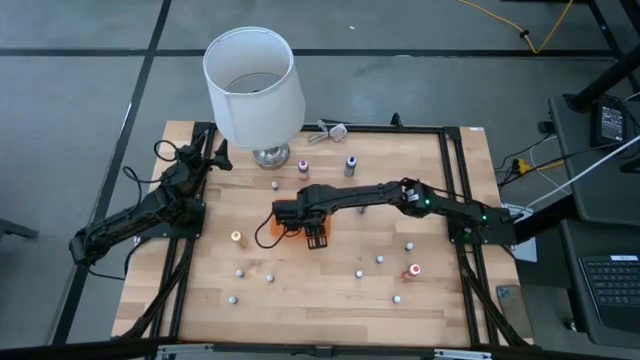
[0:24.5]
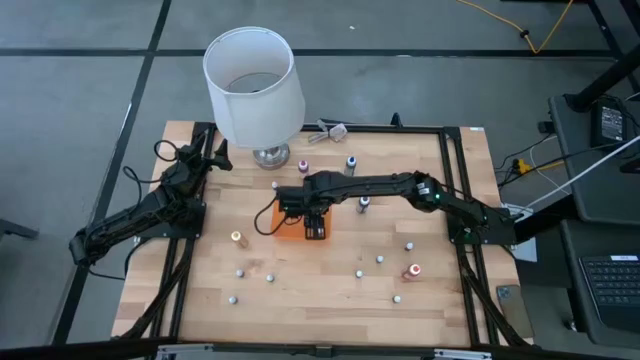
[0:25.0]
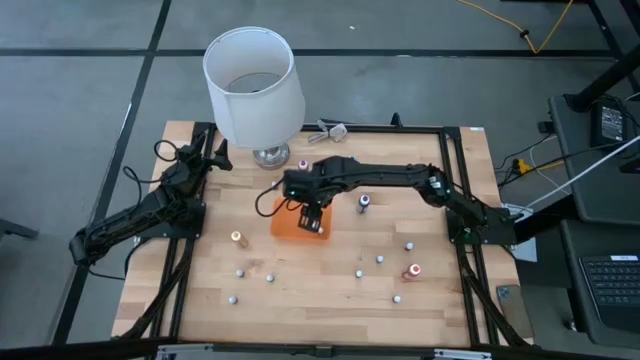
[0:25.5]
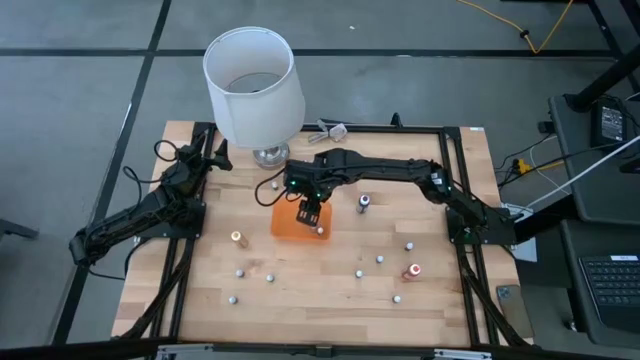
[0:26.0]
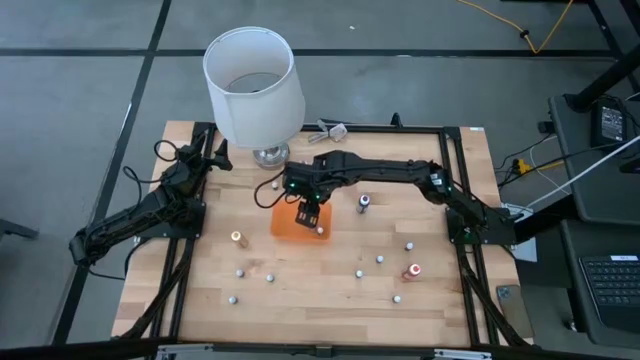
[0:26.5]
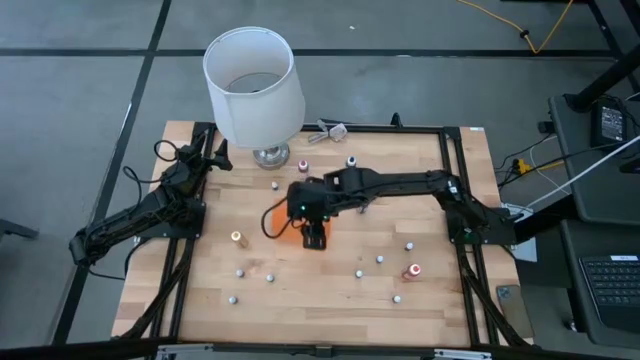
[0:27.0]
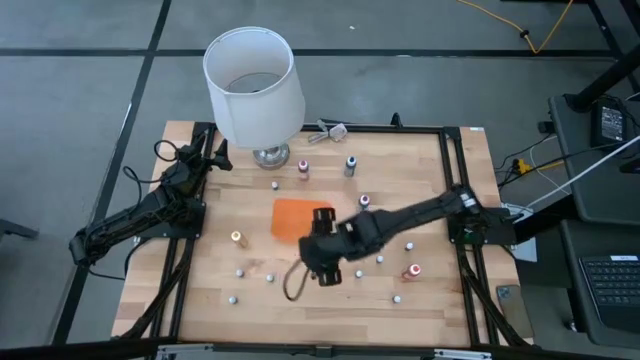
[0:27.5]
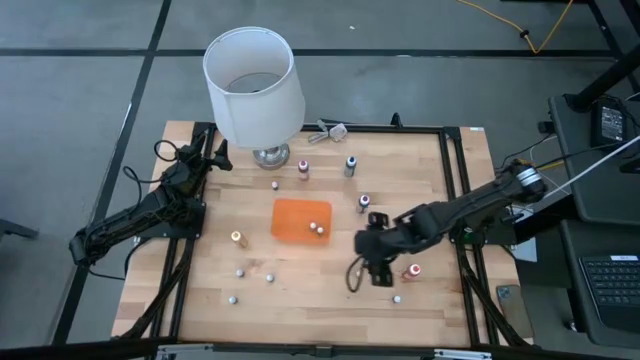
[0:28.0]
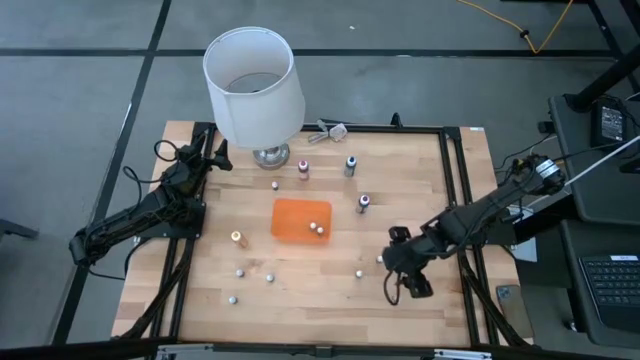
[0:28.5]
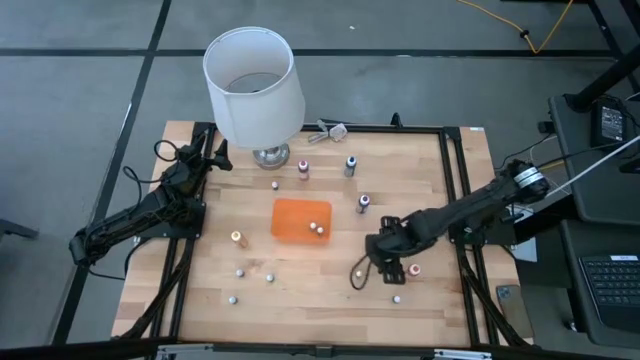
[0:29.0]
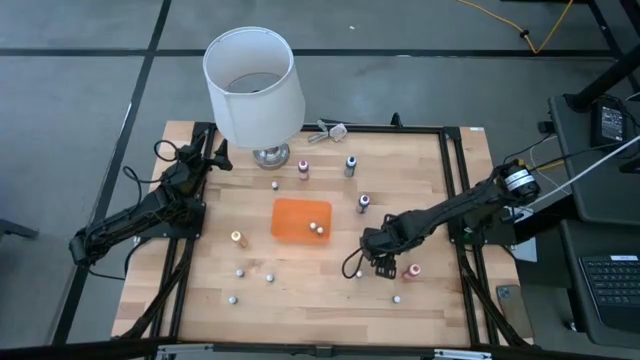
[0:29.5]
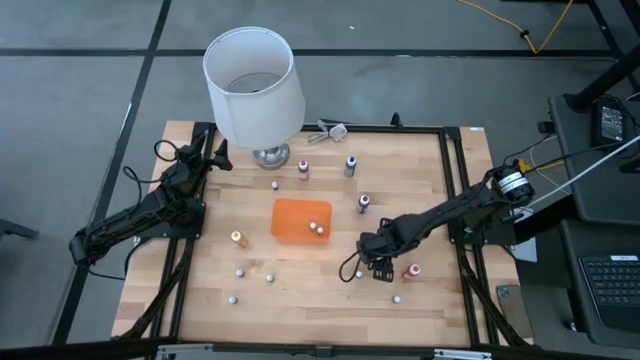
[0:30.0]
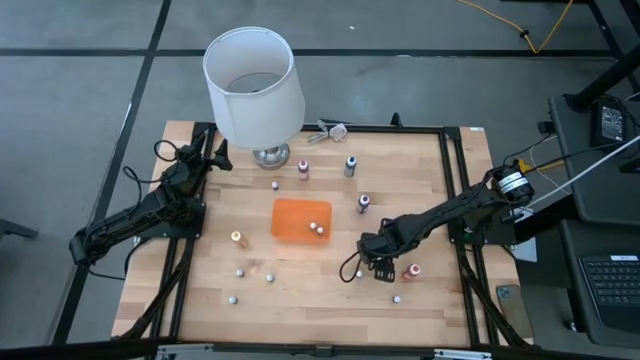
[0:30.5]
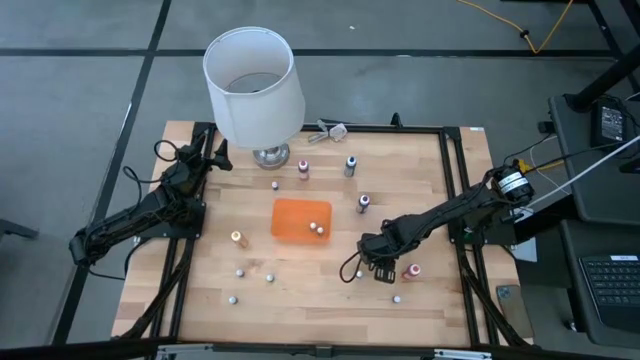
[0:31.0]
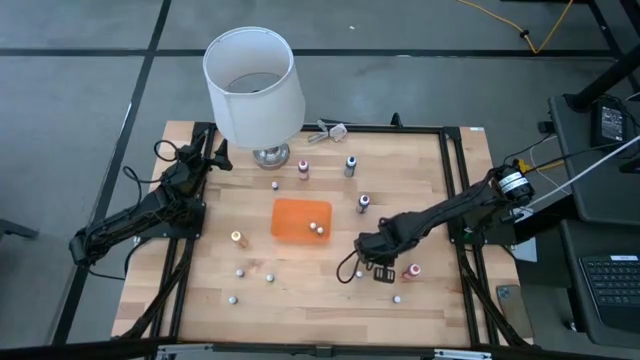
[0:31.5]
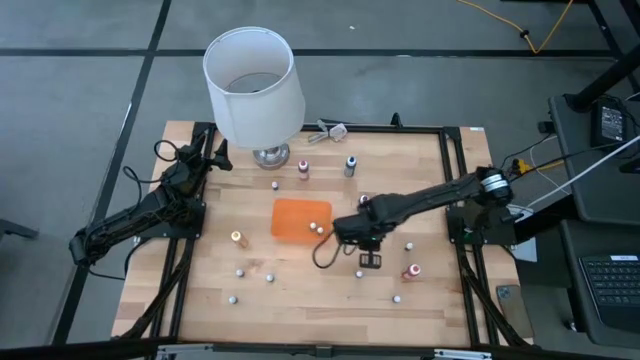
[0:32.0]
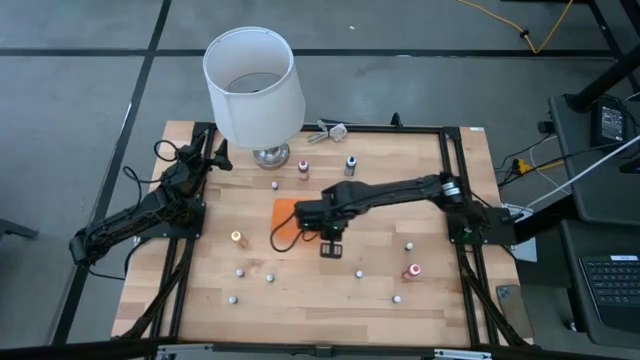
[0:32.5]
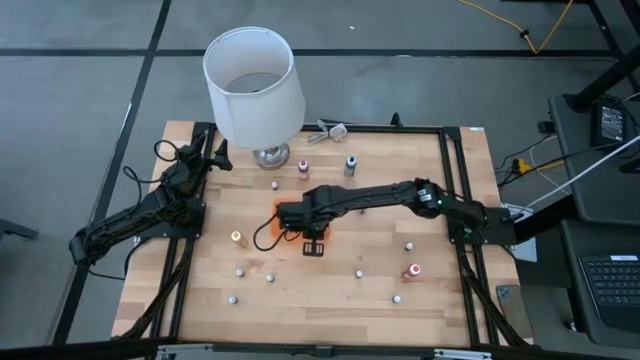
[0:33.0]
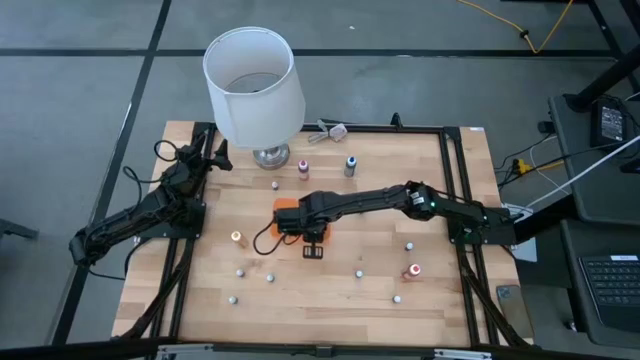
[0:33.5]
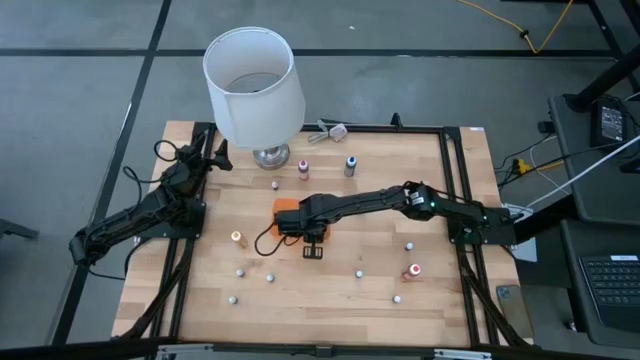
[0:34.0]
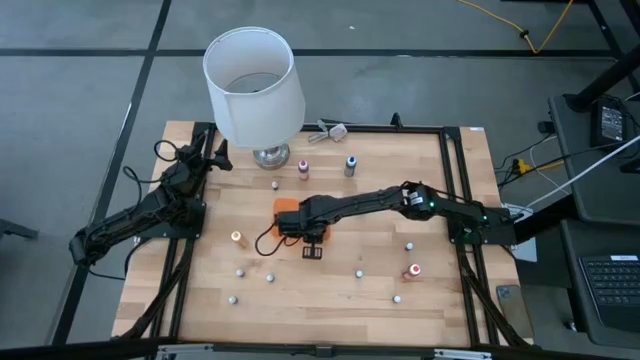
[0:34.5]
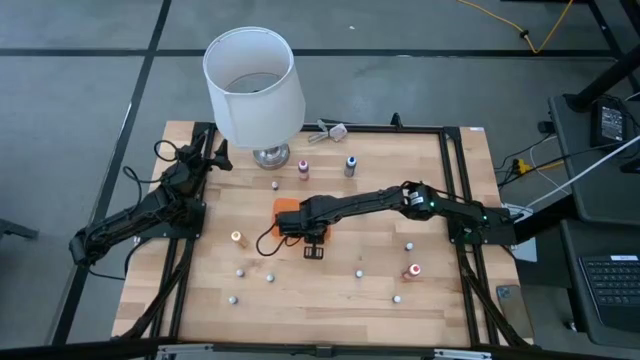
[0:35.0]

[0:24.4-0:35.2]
Task: Pick & Place food coloring
Put the small black food coloring bottle into the orange bin

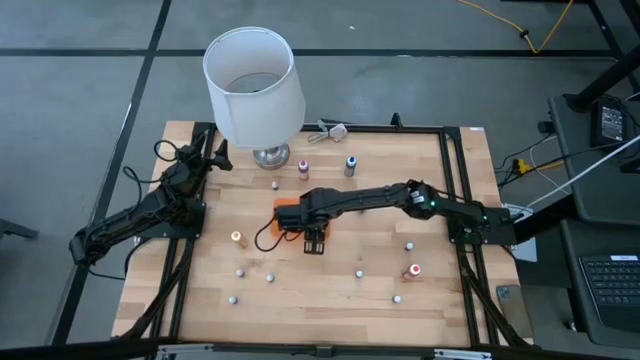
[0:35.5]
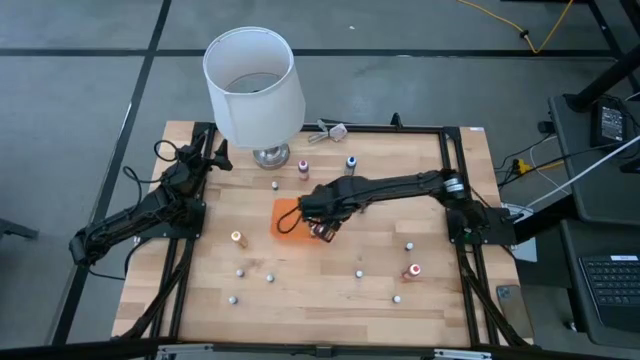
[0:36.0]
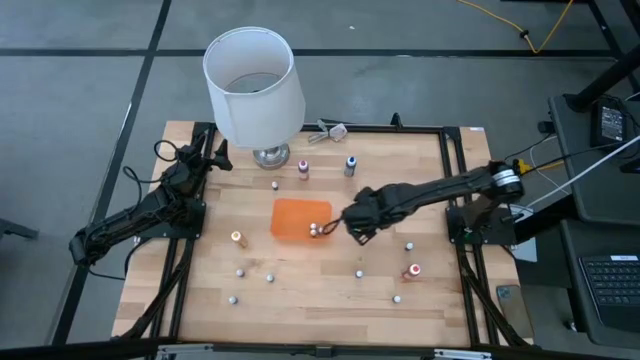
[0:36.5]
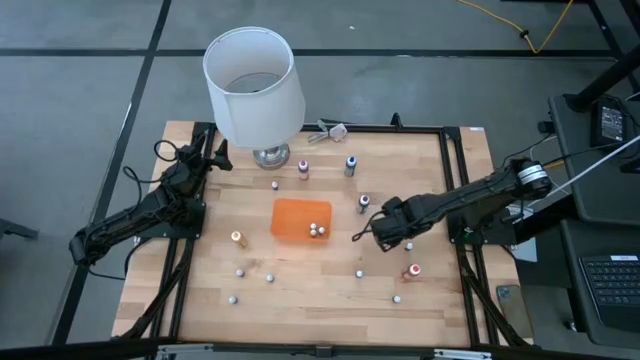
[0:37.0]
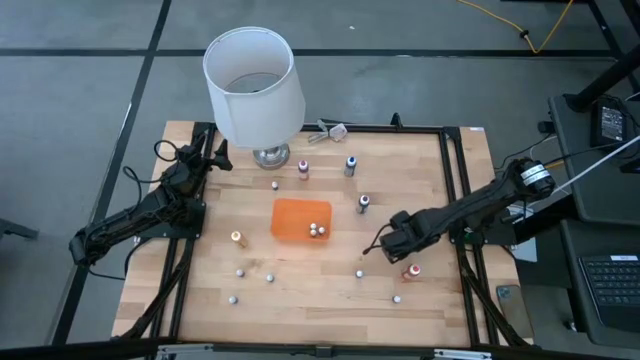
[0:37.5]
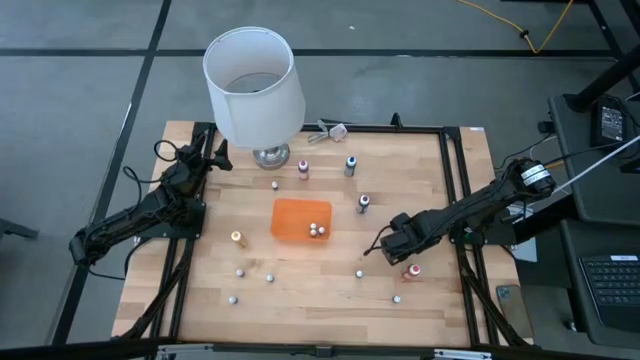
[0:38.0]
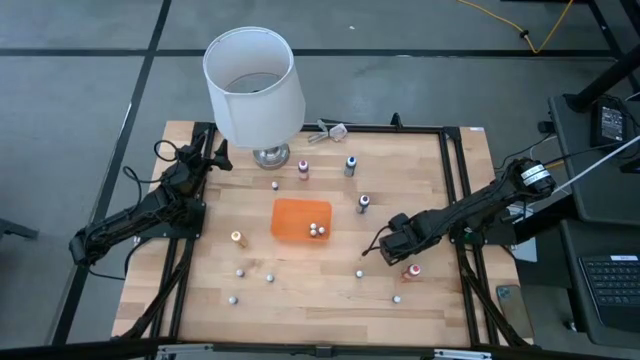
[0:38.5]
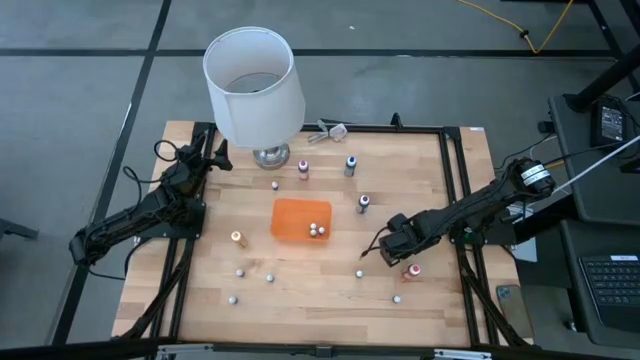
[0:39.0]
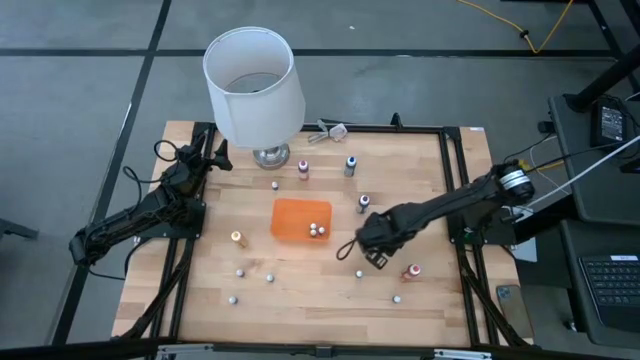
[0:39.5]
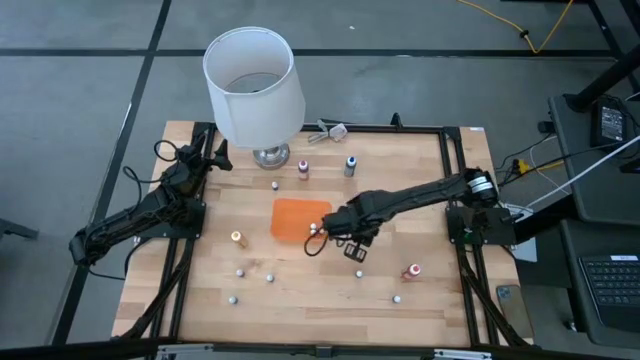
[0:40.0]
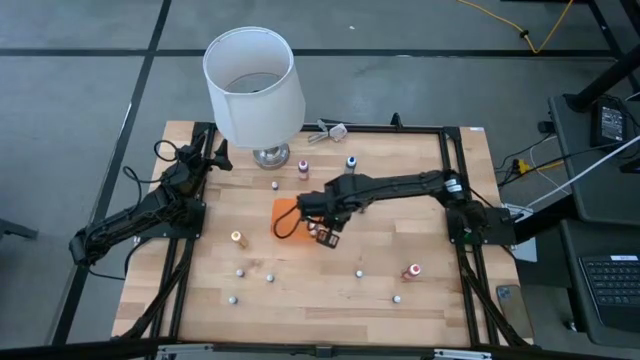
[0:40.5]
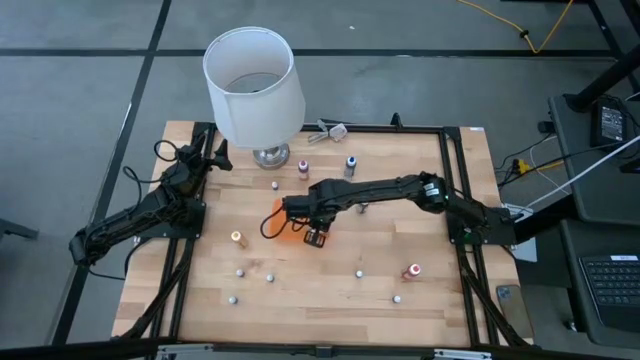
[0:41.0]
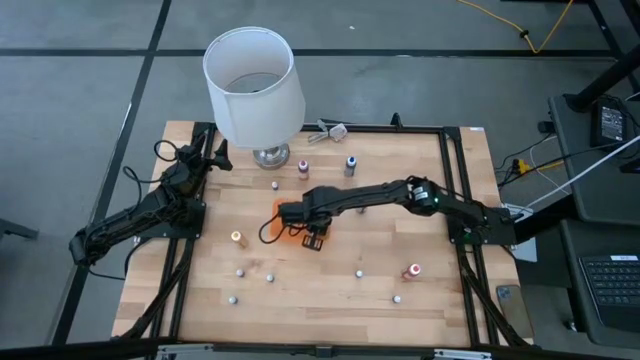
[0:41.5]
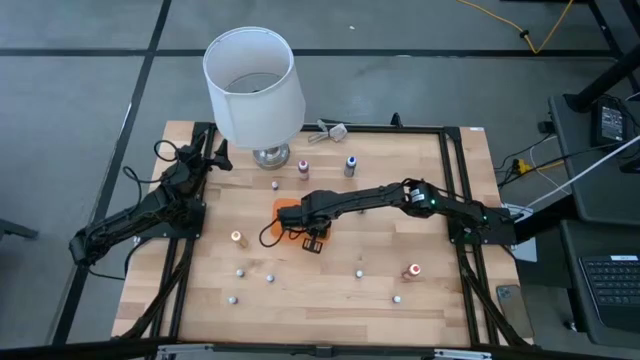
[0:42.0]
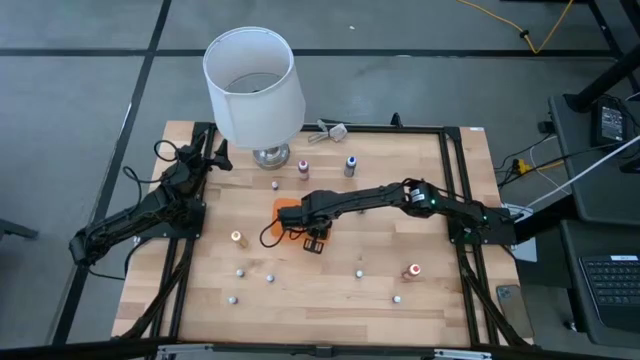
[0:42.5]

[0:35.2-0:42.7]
Put the small black food coloring bottle into the orange bin

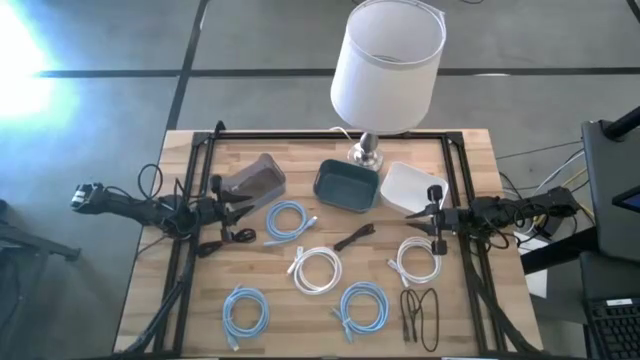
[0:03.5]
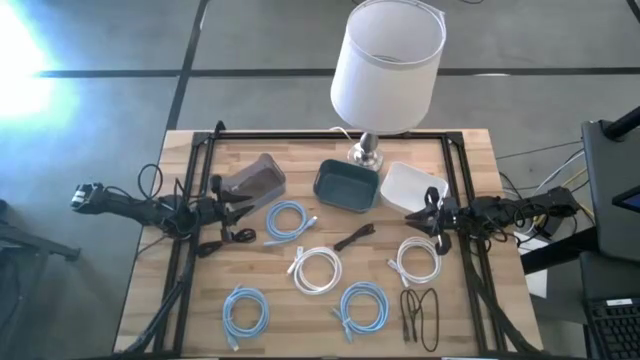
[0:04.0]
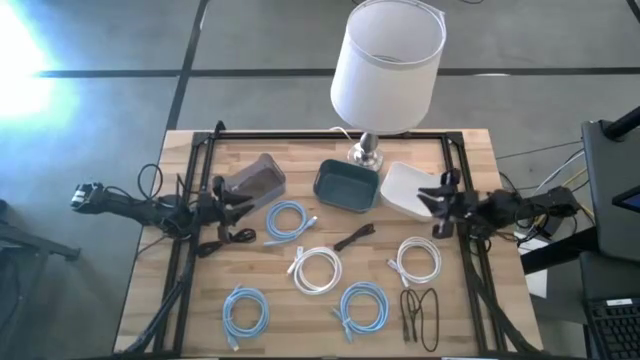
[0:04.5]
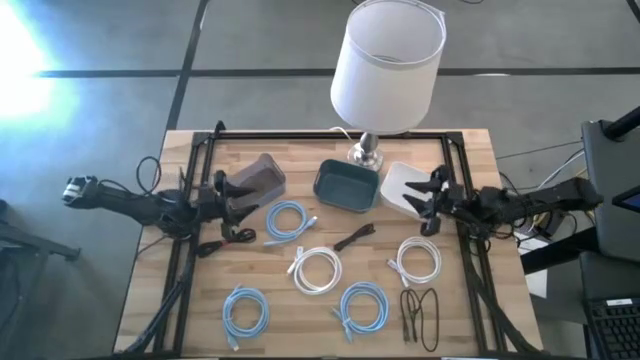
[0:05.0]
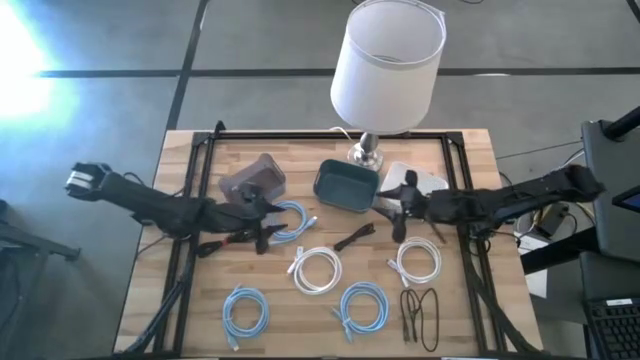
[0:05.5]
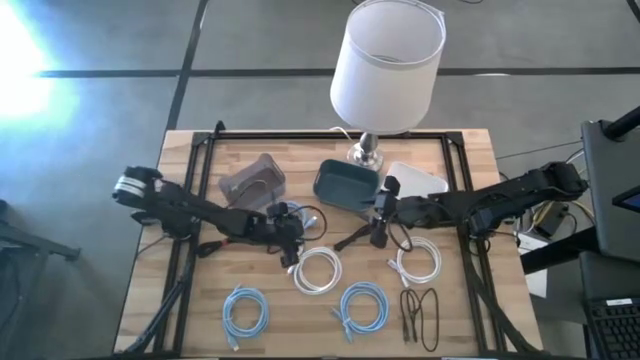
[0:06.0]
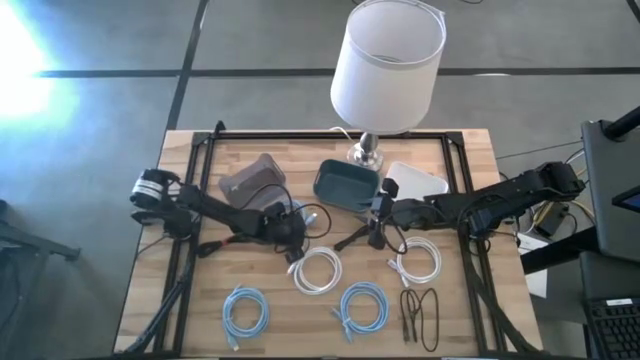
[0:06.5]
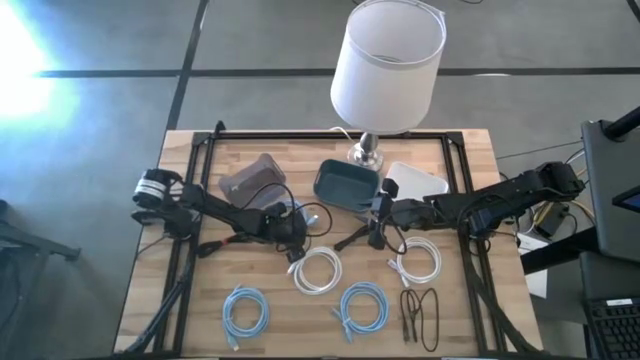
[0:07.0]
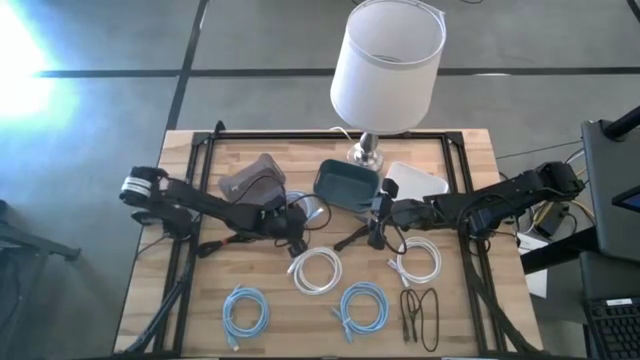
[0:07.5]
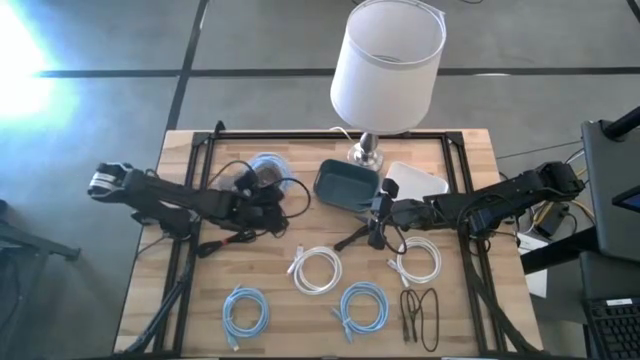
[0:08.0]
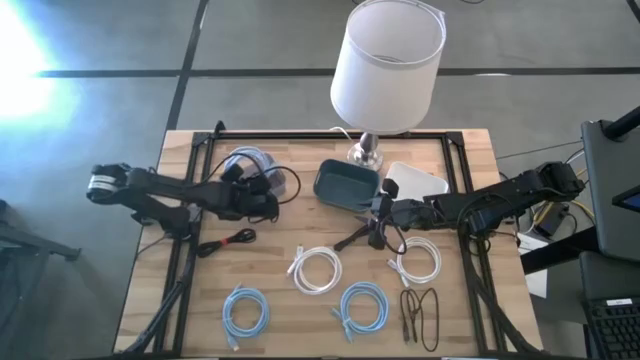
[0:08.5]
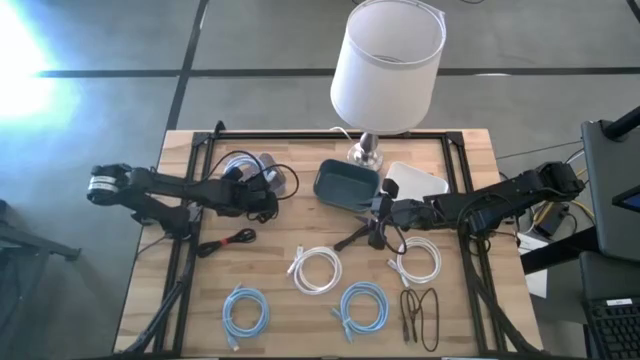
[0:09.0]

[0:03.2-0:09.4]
Task: Pick & Place USB Port
Put the top left blue HDMI cable into the black bin
